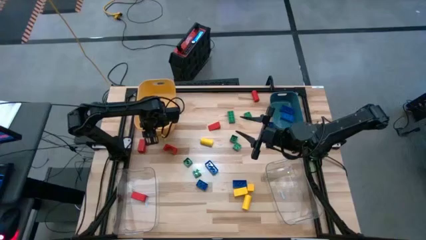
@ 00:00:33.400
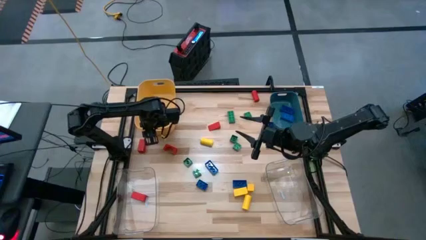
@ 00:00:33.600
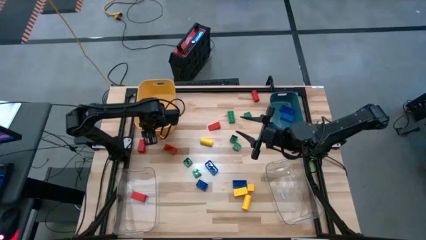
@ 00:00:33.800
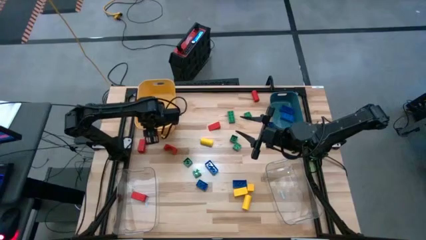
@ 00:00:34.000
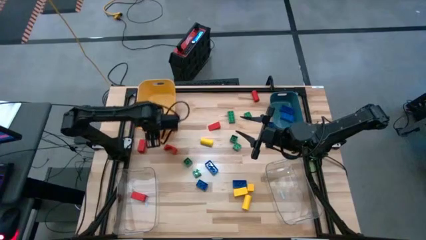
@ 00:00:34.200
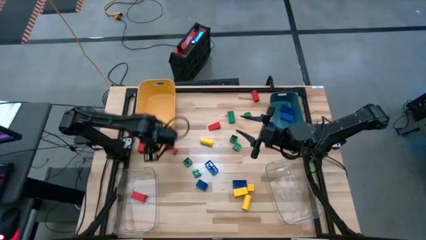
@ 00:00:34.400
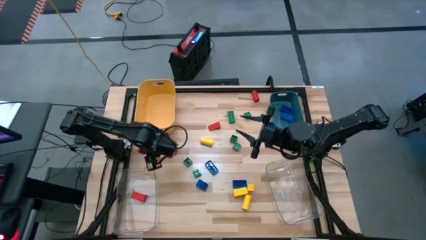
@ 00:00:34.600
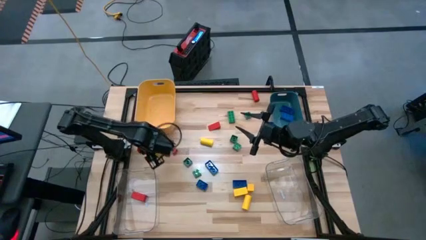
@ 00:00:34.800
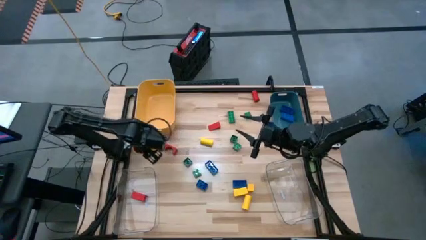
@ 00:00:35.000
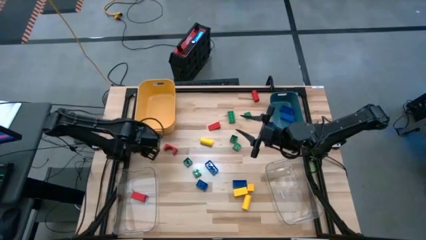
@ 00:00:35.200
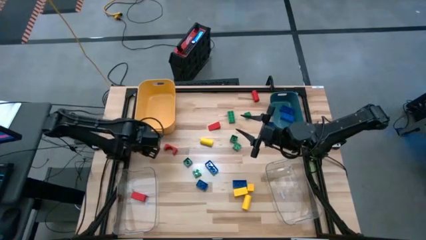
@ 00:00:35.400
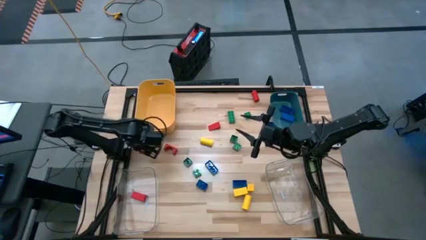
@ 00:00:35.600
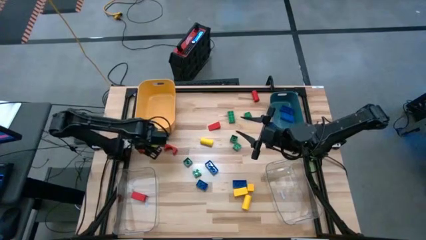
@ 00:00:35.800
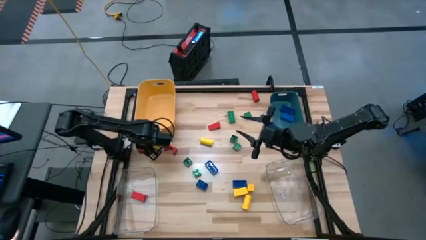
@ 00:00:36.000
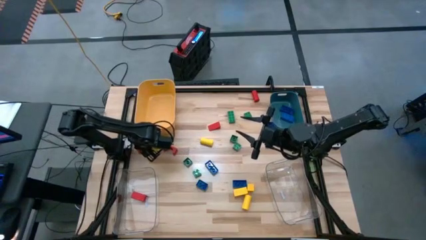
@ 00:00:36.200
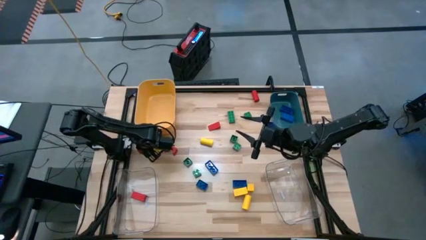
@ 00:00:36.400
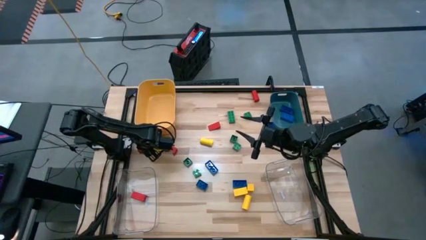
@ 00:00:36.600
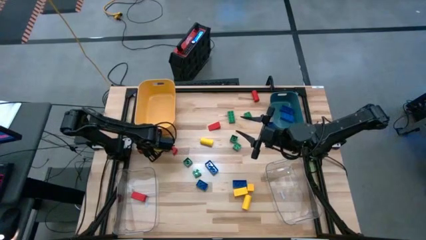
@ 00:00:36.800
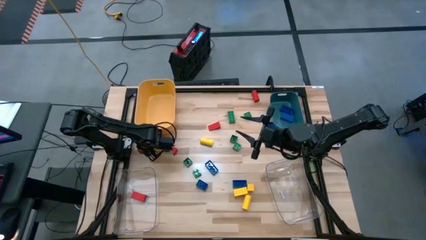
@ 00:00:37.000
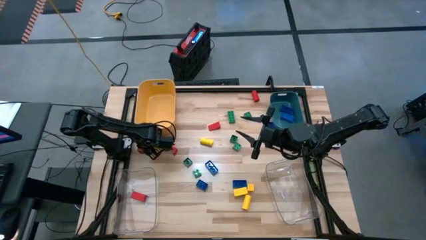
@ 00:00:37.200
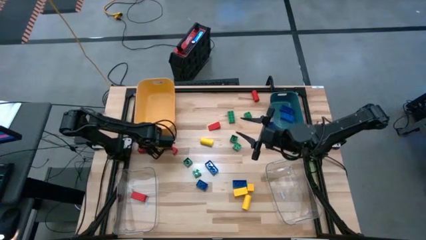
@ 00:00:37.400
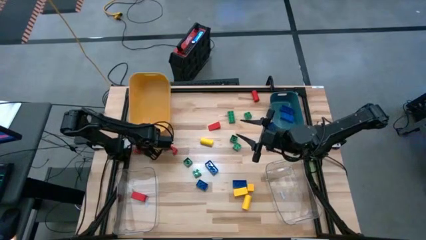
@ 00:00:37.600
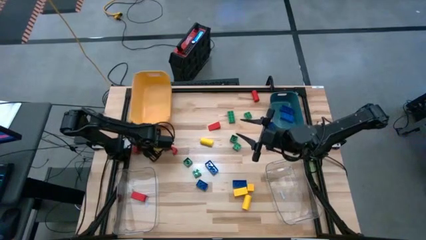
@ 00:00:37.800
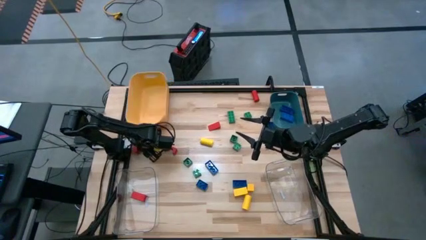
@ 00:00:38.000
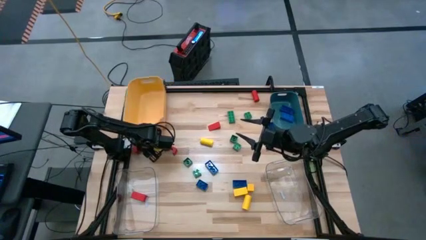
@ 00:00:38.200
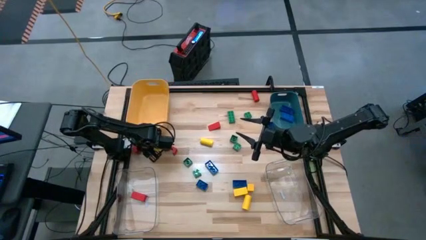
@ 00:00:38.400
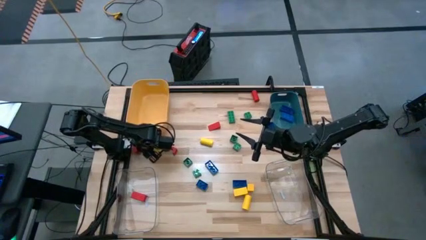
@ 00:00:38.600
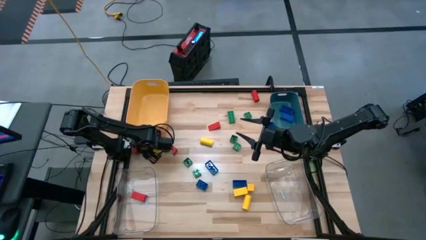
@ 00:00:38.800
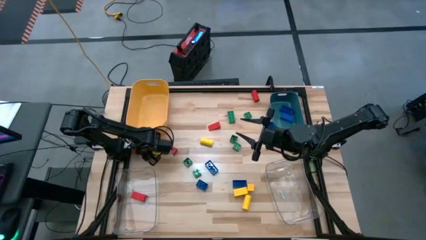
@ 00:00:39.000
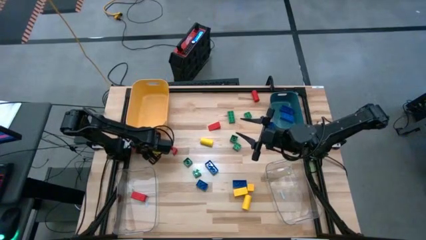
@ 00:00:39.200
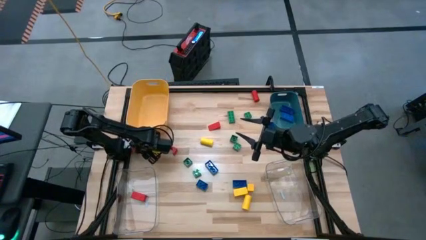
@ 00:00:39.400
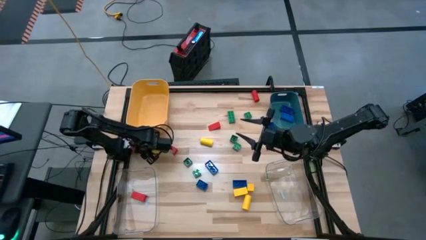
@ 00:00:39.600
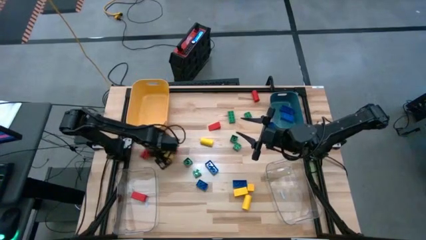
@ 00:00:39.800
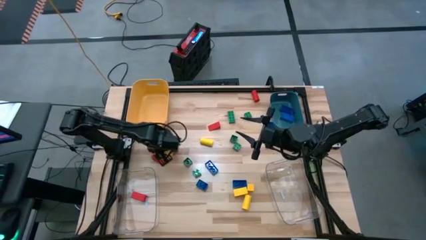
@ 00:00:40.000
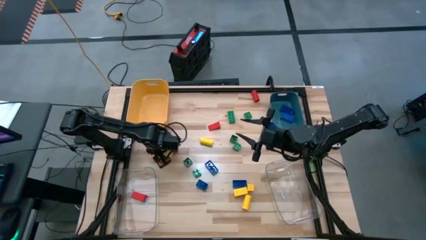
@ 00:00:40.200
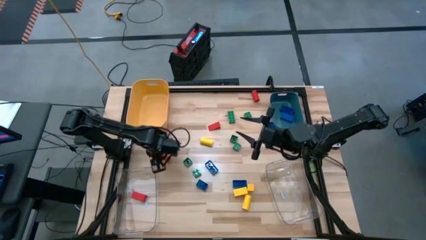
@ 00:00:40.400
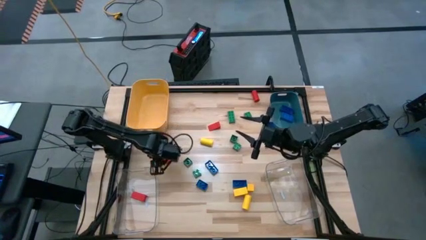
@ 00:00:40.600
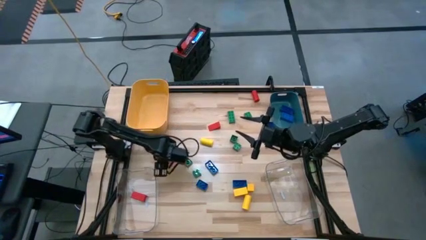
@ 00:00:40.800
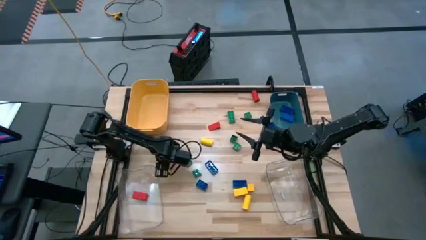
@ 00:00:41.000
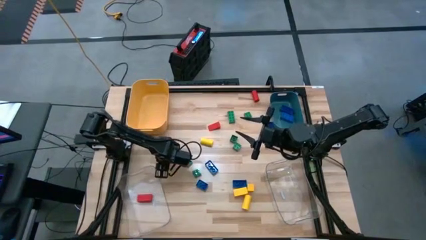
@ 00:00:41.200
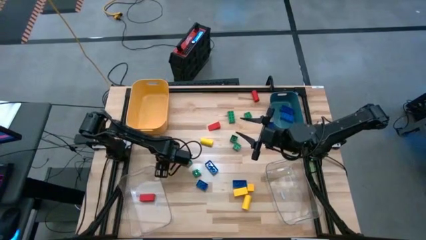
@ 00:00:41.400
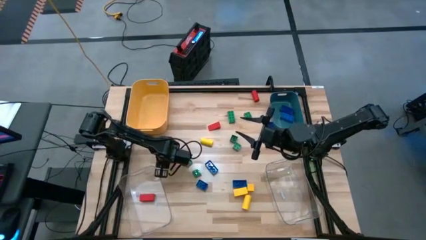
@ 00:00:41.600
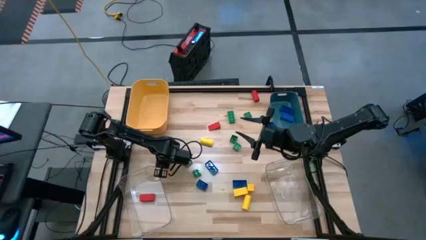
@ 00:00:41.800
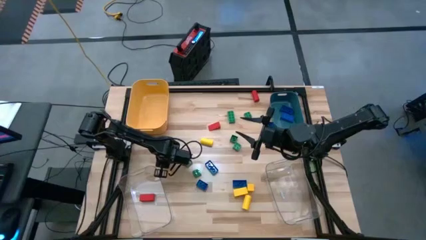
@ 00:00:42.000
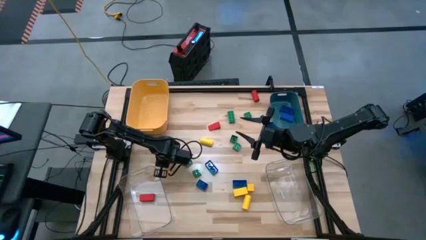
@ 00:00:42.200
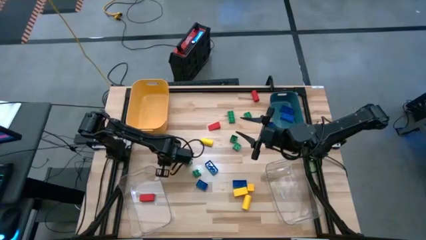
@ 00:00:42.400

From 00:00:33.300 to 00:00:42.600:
Task: Sort blocks
Put the red wooden block into the left transparent bin

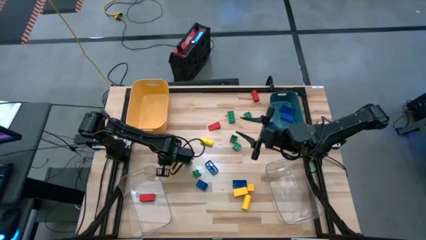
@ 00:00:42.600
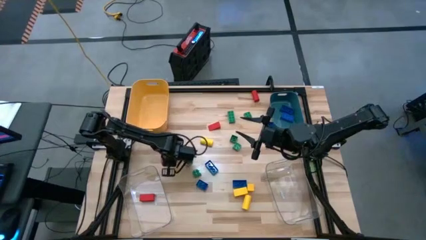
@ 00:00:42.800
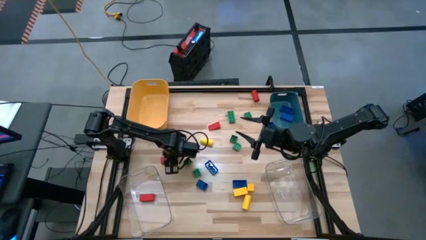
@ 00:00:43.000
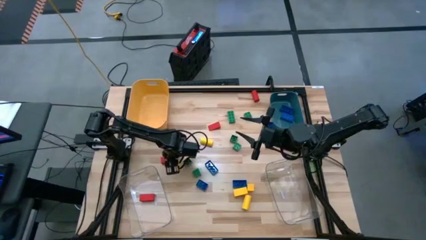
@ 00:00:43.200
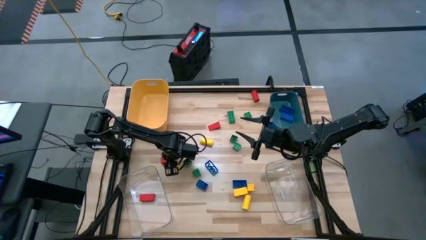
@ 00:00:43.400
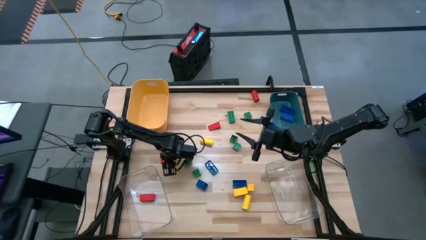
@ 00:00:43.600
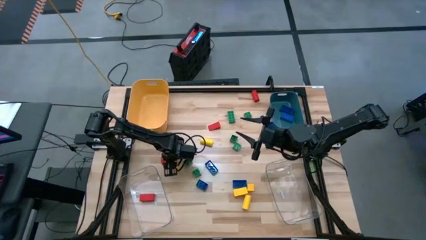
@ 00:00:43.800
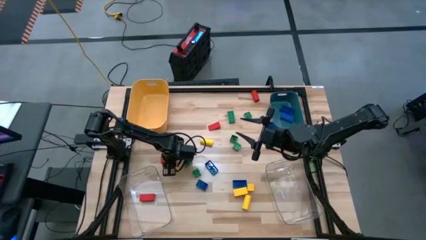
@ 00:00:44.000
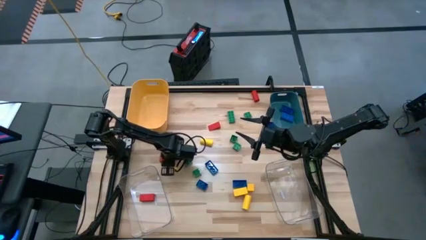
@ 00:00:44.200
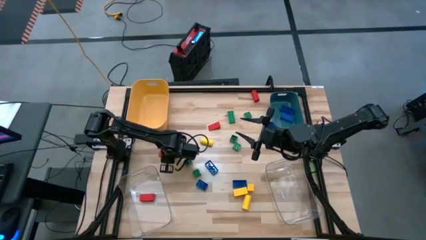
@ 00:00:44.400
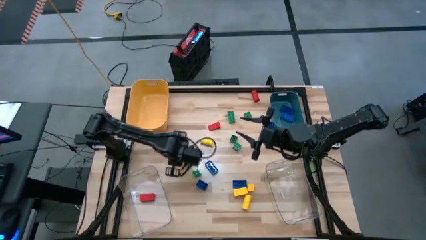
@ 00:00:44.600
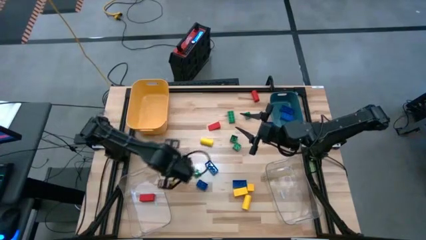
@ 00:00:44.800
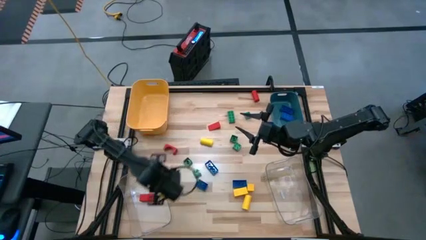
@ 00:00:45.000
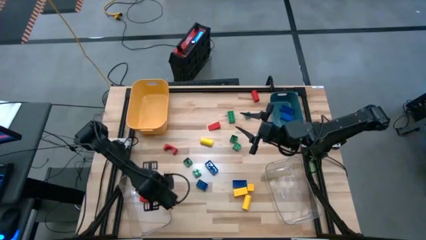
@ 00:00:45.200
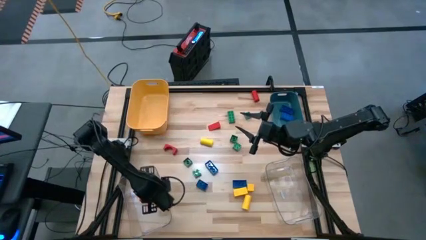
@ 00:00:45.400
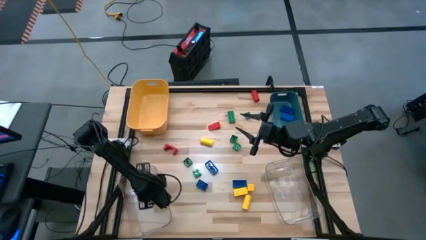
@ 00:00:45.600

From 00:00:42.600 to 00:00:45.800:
Put the red wooden block into the left transparent bin

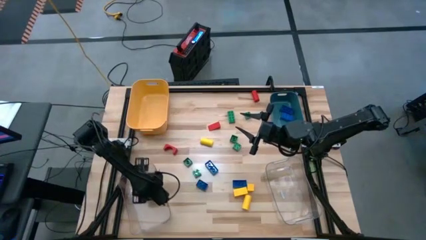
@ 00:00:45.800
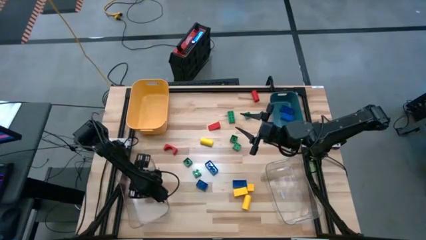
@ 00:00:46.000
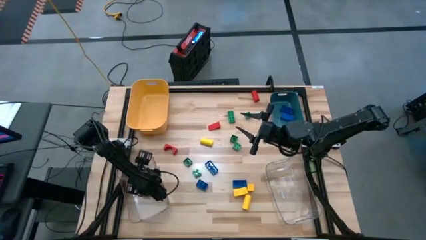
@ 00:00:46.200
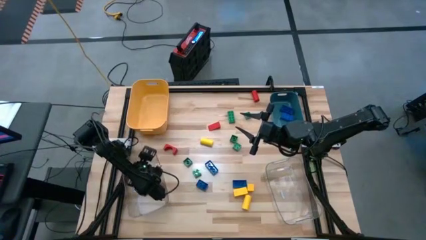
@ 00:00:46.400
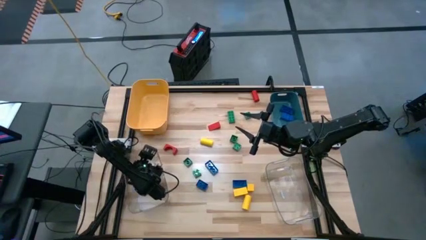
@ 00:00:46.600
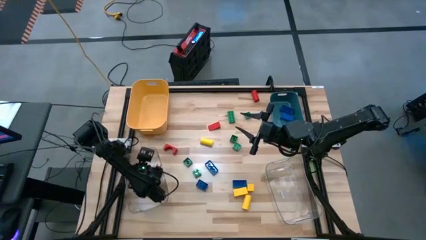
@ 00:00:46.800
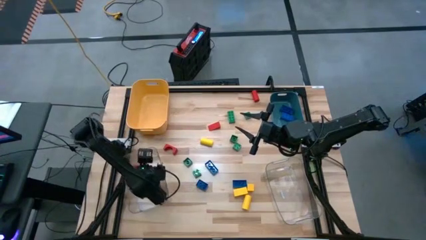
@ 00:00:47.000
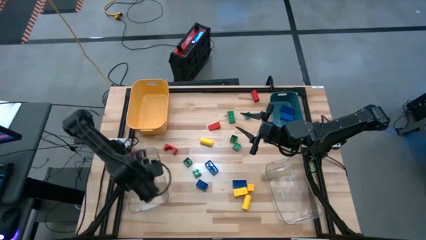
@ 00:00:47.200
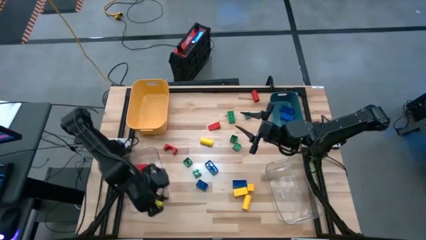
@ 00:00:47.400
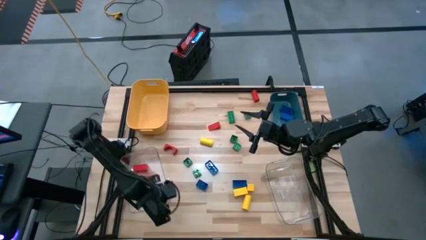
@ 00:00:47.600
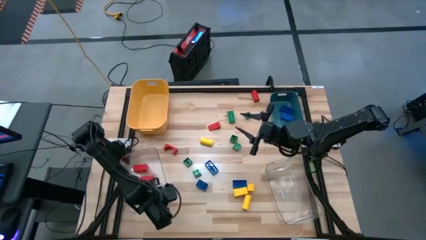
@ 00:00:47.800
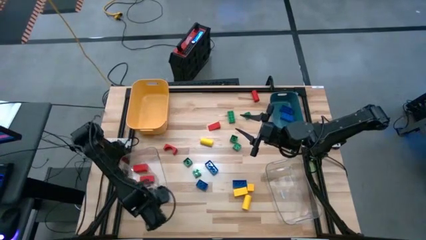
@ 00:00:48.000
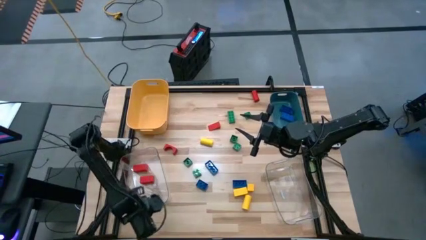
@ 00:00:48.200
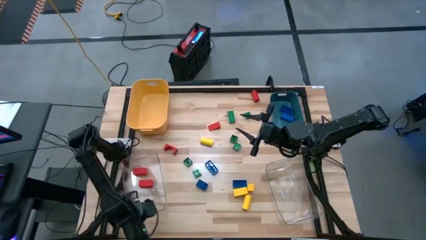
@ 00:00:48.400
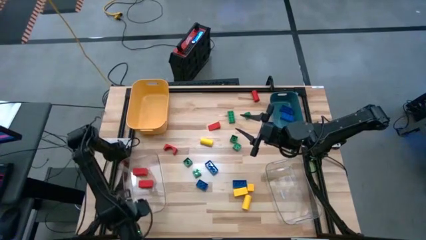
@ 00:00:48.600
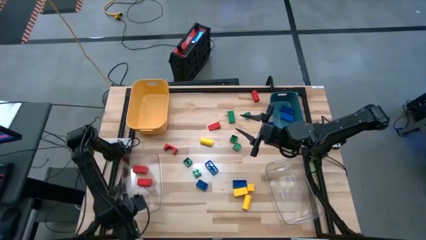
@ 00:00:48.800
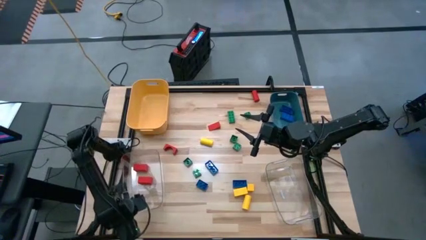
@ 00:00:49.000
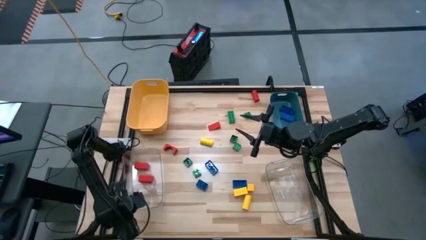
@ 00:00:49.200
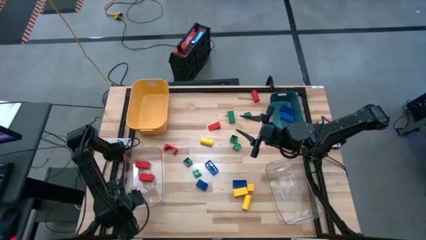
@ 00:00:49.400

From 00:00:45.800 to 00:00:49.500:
Adjust the left transparent bin
